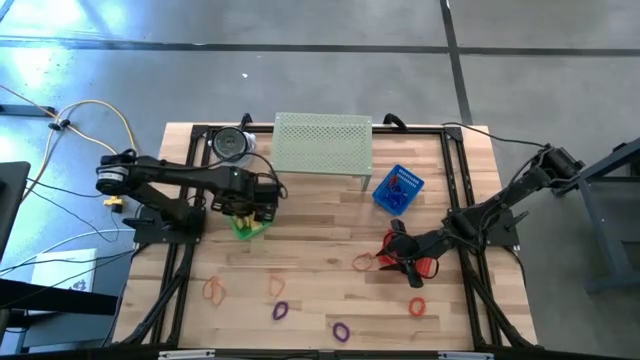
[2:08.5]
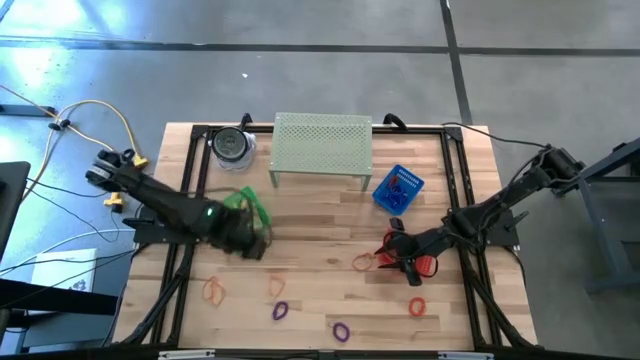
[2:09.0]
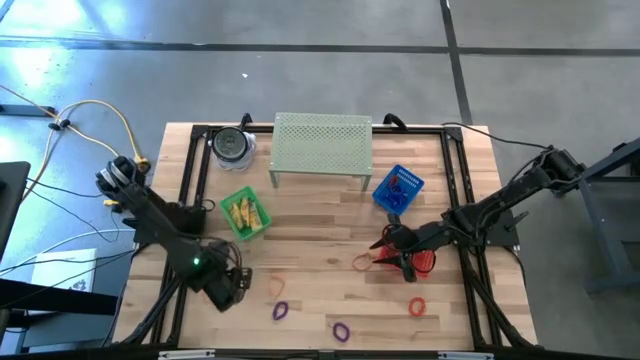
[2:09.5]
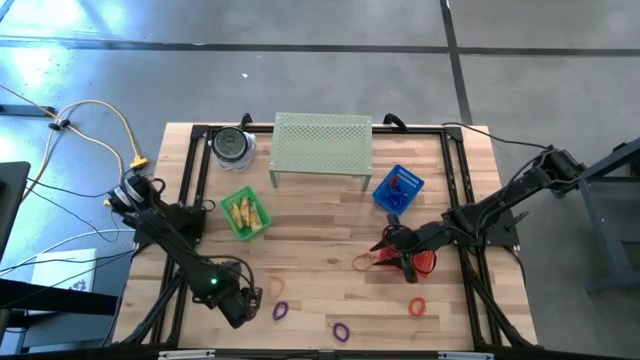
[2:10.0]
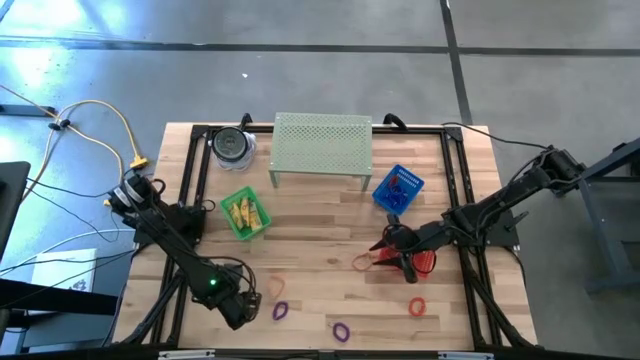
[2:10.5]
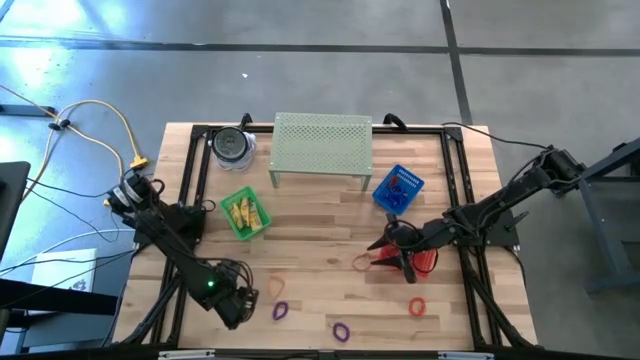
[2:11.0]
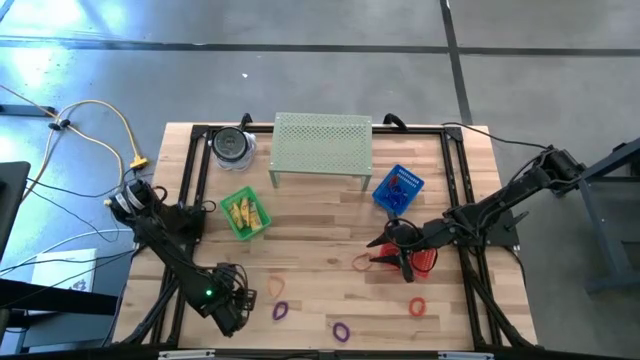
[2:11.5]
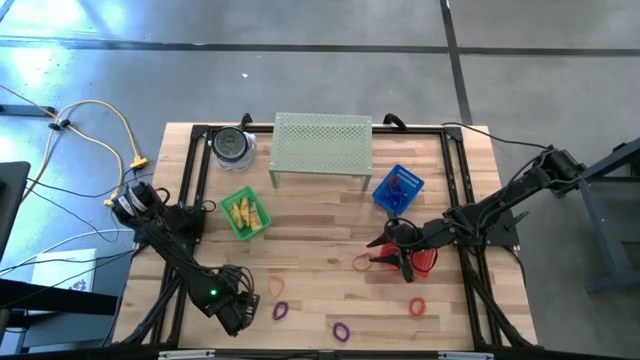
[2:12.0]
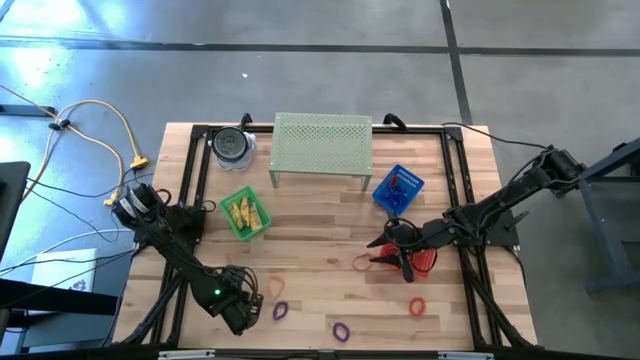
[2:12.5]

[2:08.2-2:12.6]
Task: Pick & Place Office Desk Supplies
Put the orange rubberband into the red basket

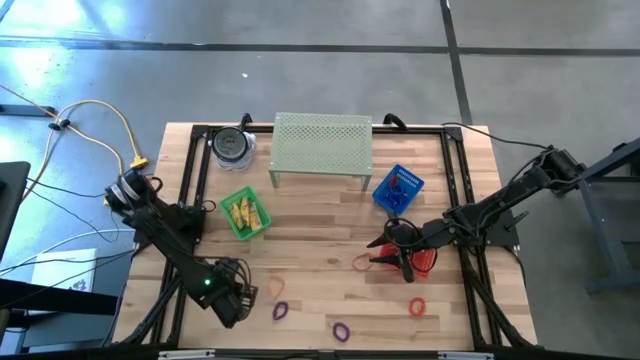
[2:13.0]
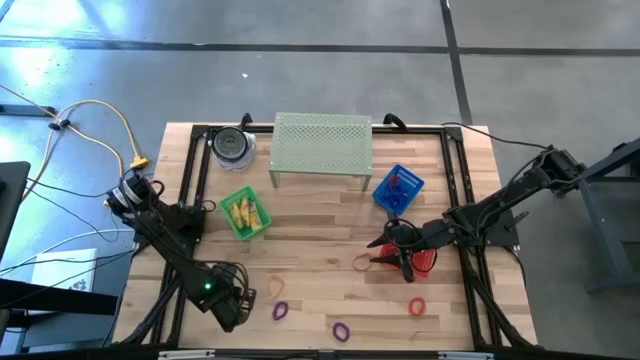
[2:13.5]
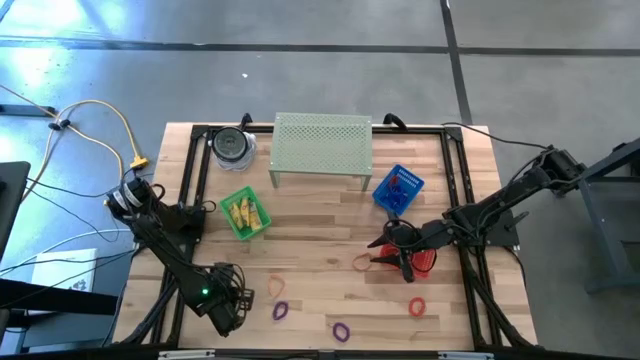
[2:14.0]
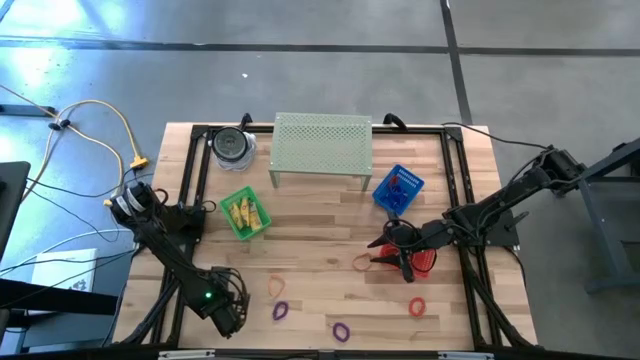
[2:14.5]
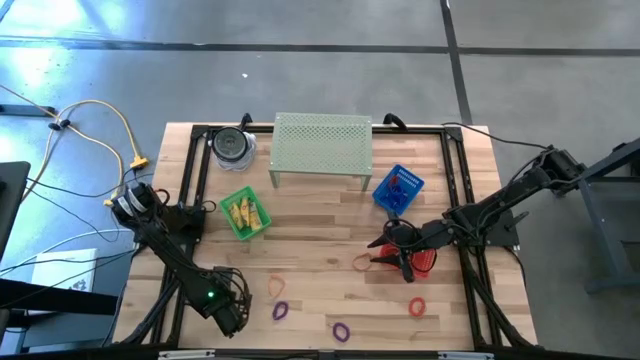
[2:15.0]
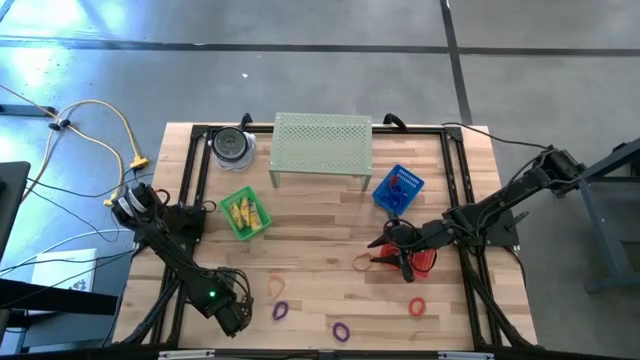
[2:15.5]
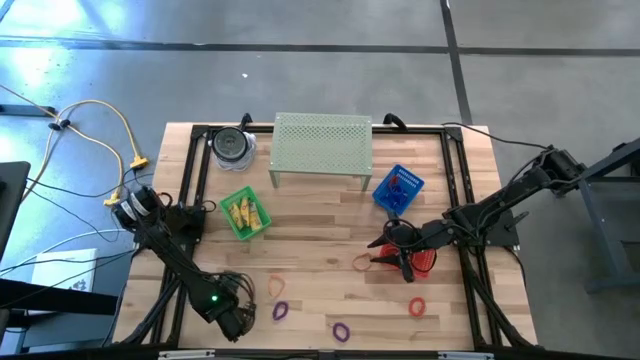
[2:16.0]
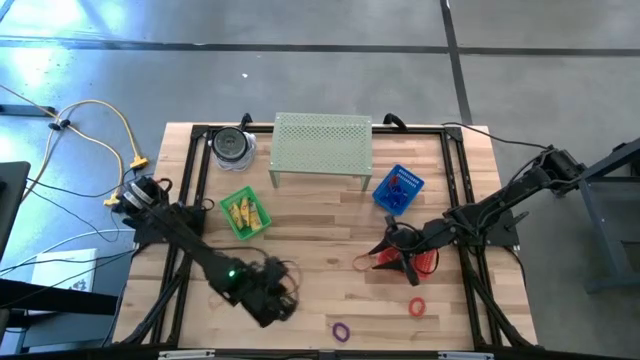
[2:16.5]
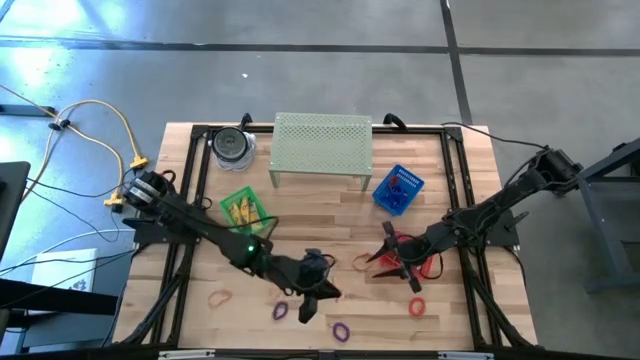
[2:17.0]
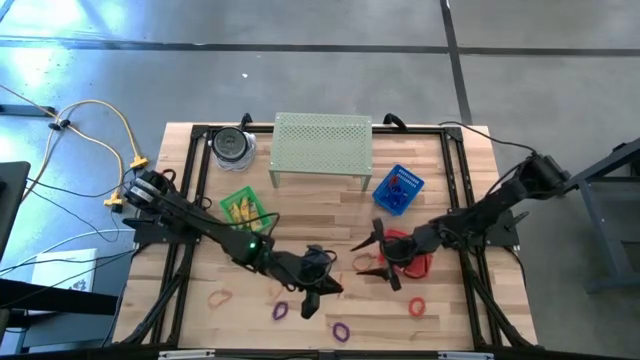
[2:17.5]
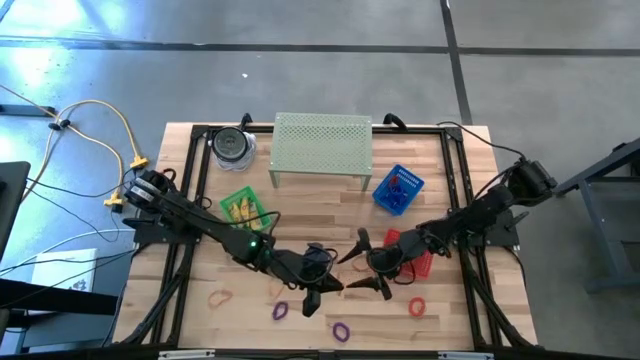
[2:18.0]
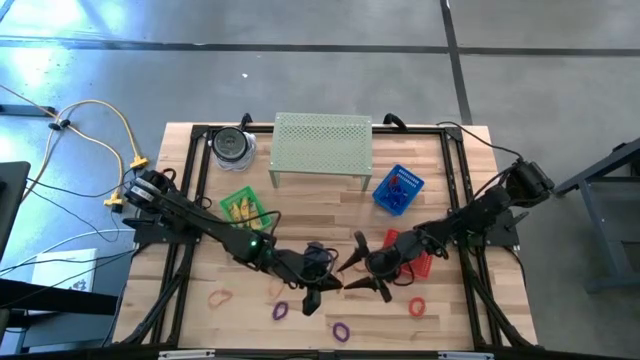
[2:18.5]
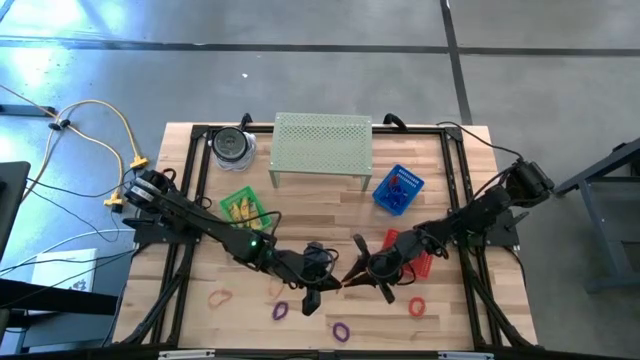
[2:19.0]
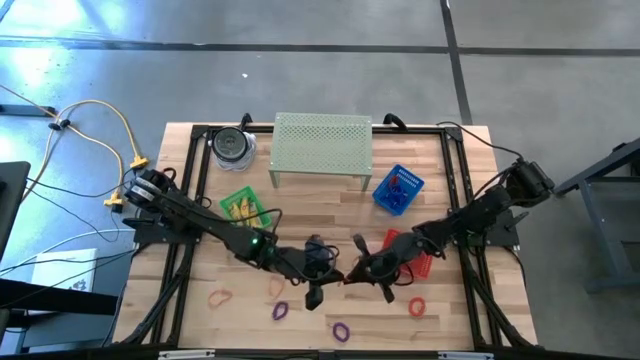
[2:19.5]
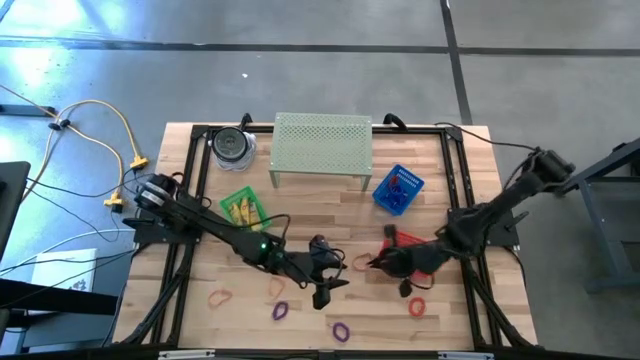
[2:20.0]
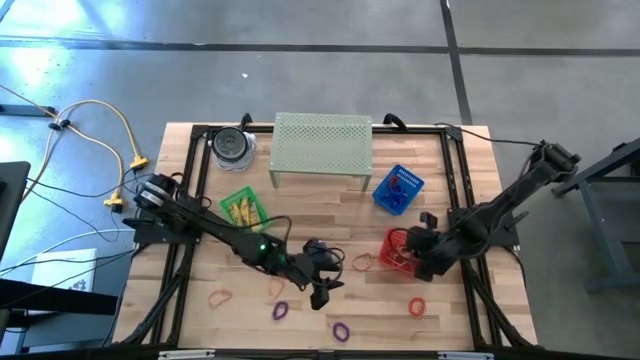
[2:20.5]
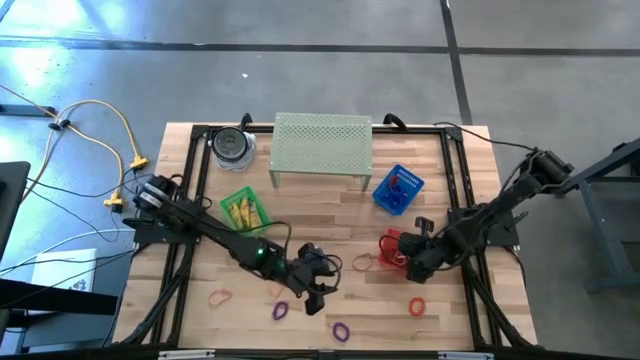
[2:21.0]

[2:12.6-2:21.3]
Put the orange rubberband into the red basket

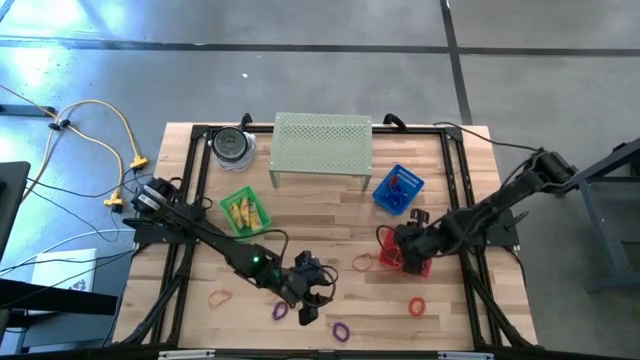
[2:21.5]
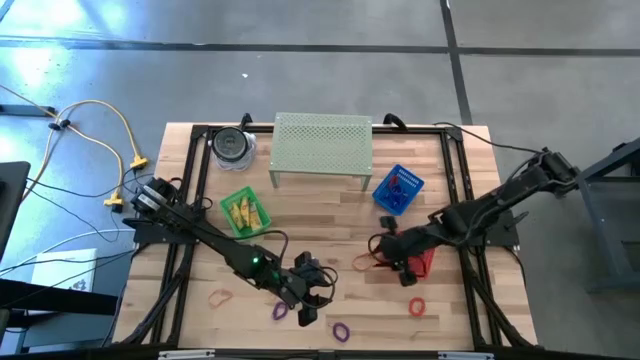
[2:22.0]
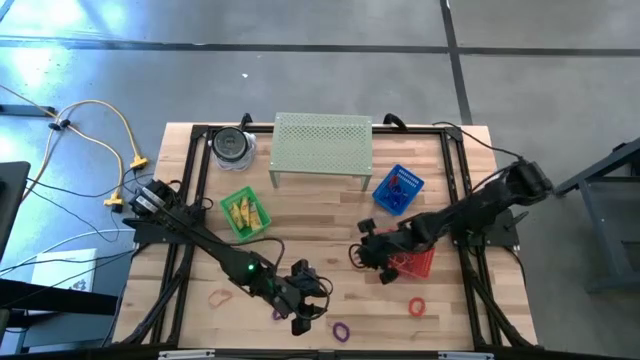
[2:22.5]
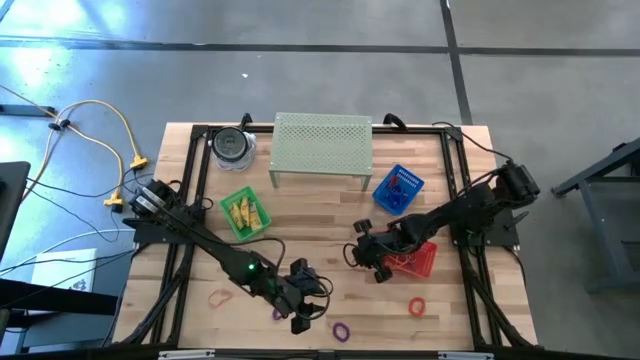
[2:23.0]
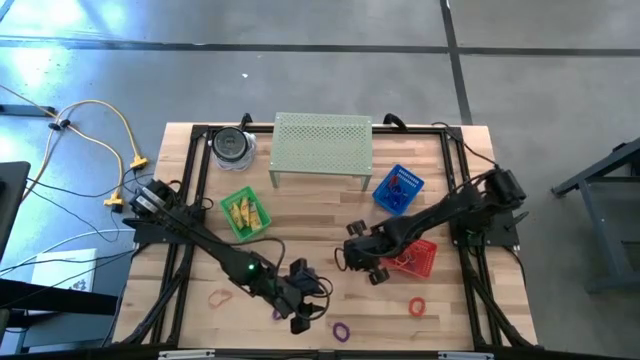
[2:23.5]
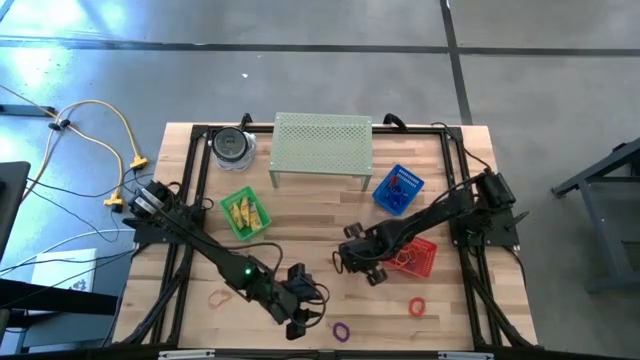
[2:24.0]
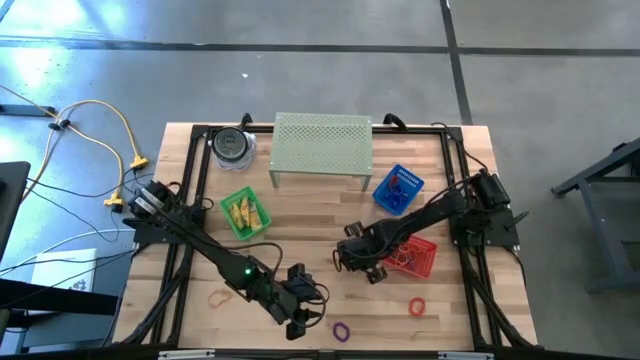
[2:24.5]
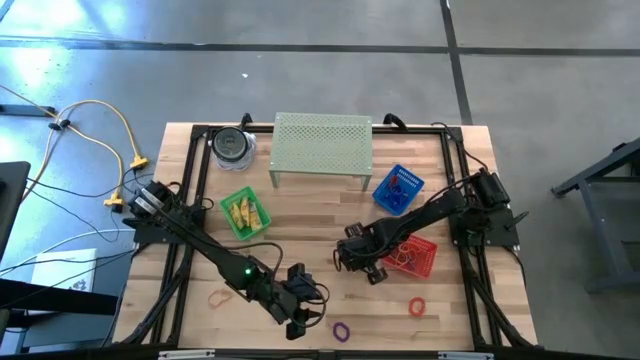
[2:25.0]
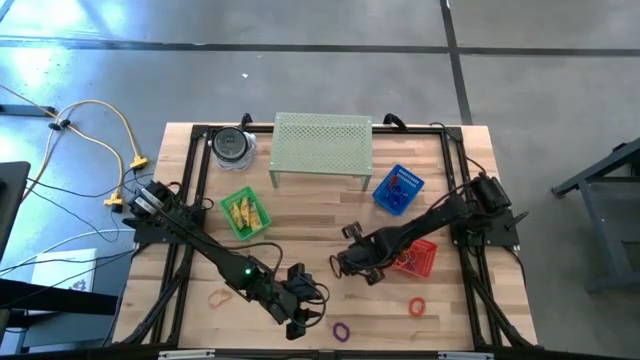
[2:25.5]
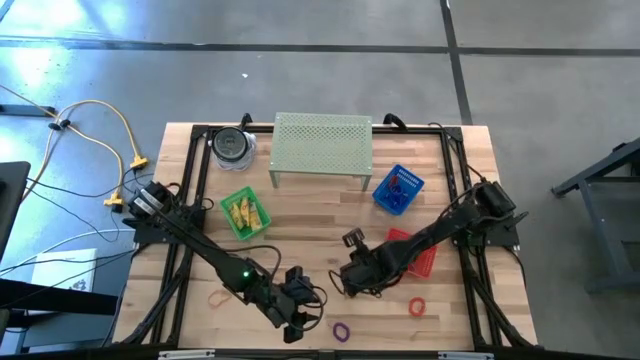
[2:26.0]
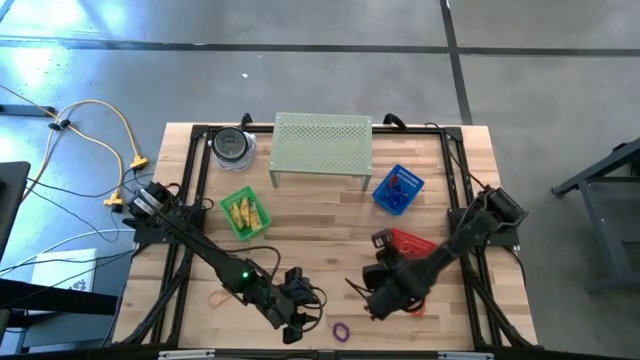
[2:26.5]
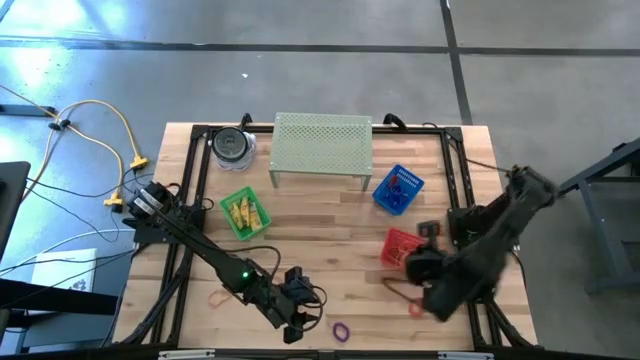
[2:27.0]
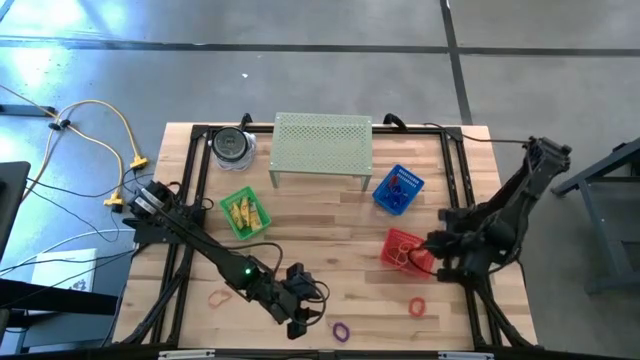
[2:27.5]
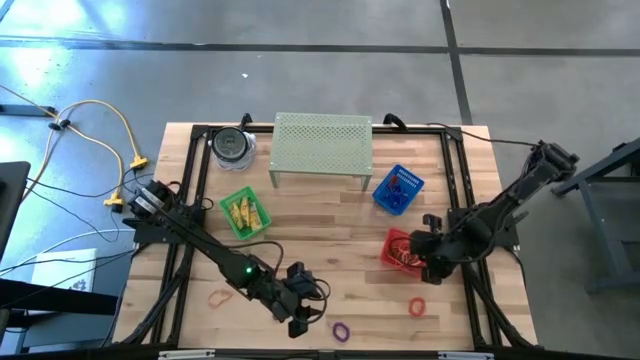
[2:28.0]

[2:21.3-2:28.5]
Put the orange rubberband into the red basket

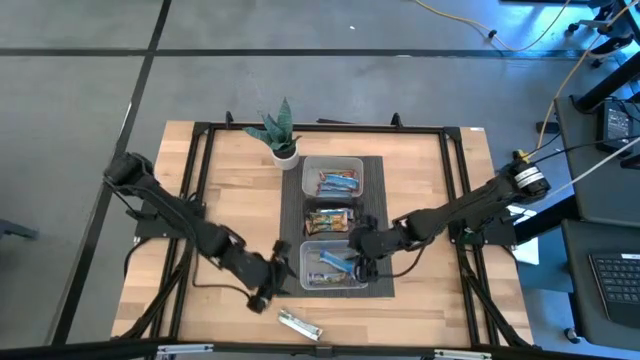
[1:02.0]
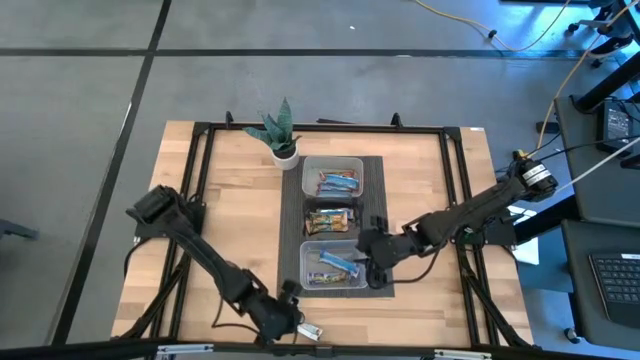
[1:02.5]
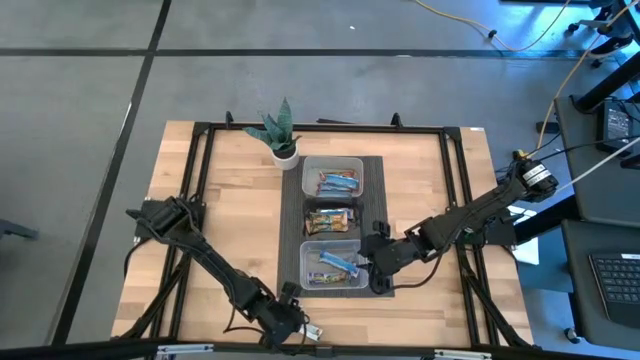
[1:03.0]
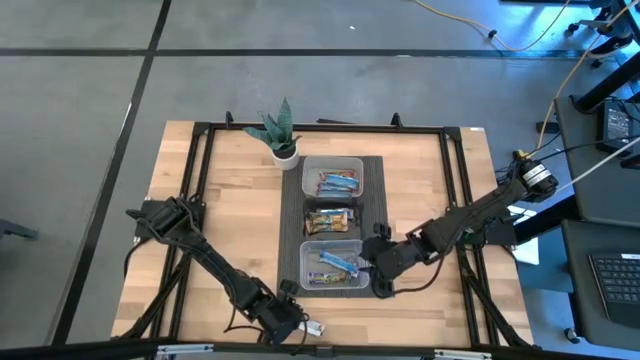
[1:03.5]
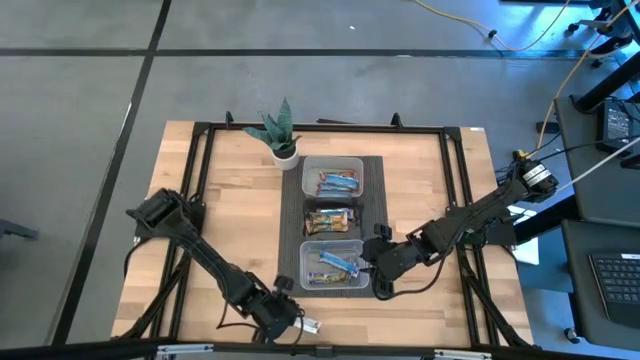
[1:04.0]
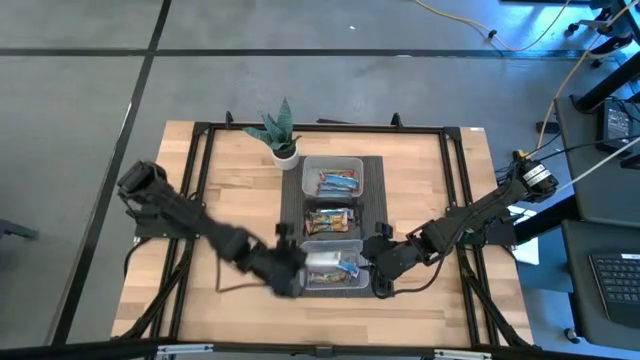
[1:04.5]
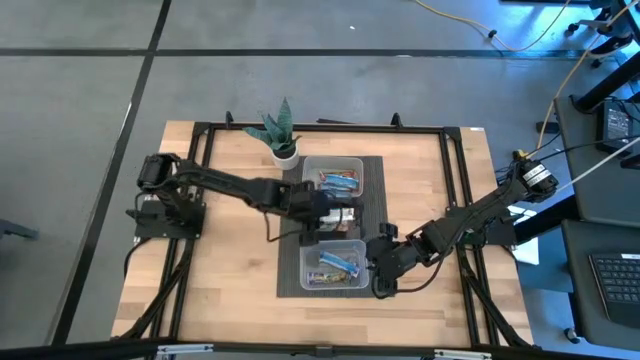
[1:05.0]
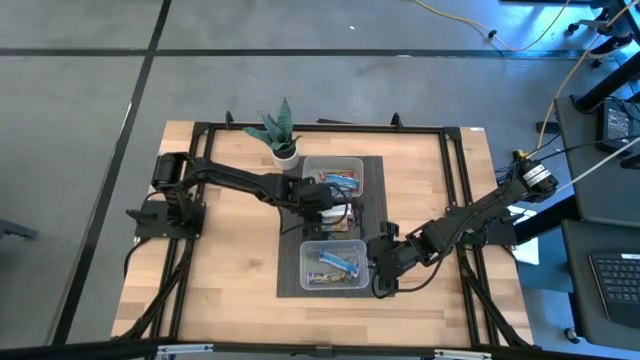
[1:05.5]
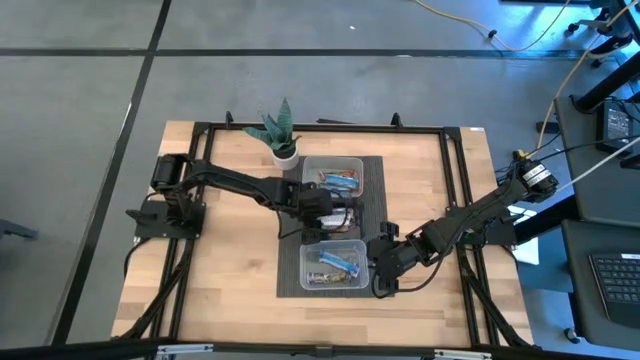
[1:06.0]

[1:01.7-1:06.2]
Task: Pick and place Granola Bars by type
Put the yellow granola bar into the black bin
